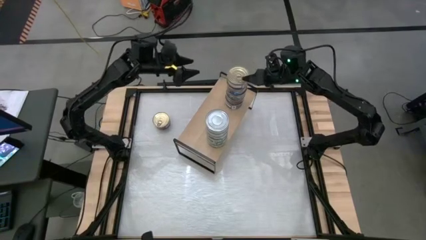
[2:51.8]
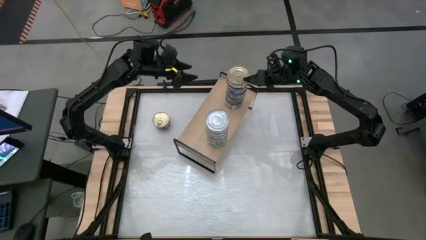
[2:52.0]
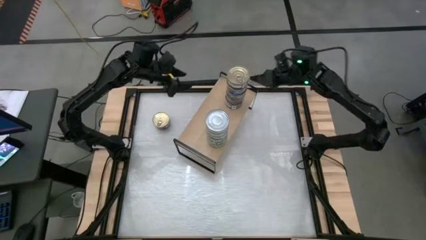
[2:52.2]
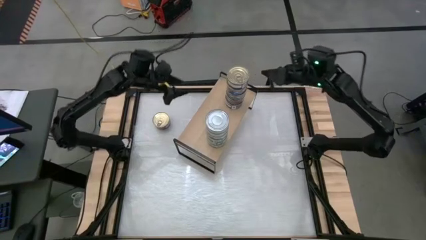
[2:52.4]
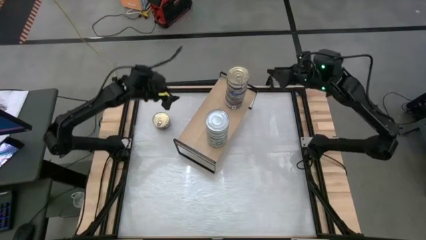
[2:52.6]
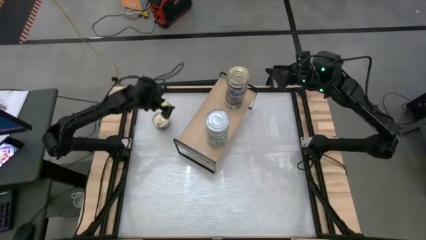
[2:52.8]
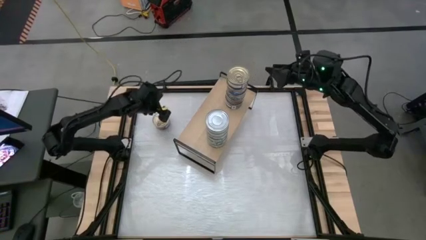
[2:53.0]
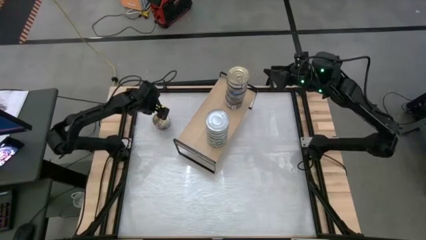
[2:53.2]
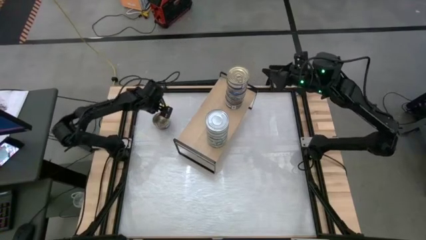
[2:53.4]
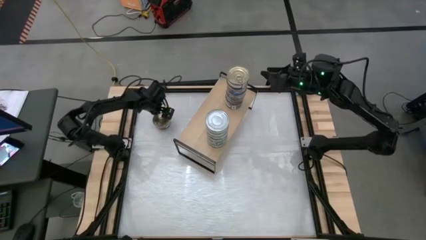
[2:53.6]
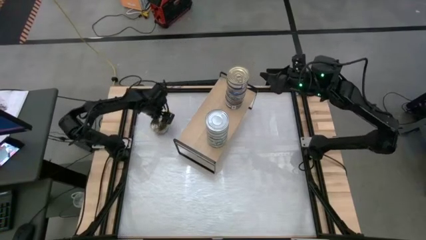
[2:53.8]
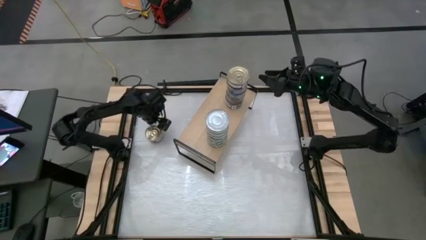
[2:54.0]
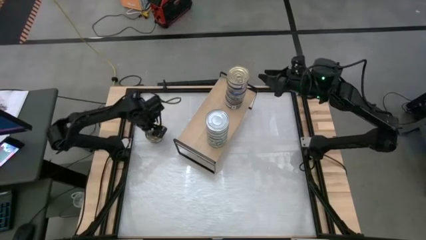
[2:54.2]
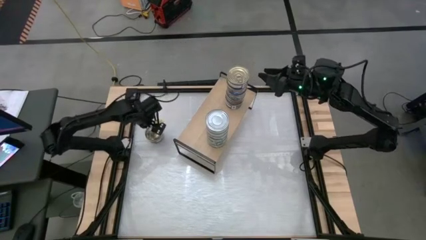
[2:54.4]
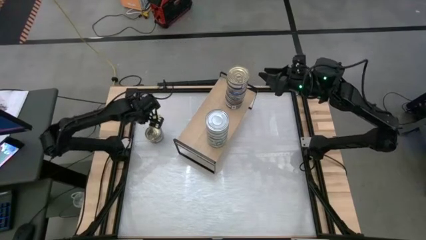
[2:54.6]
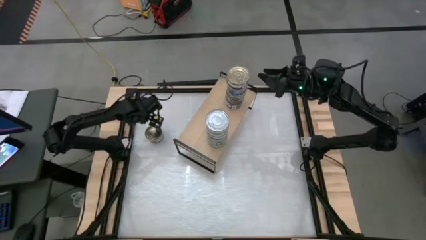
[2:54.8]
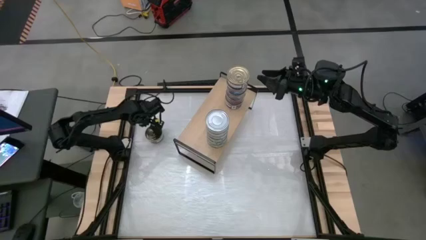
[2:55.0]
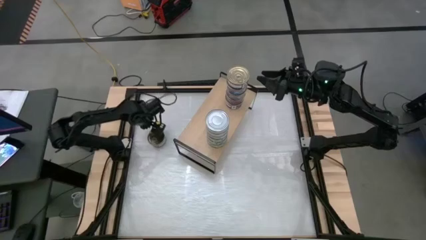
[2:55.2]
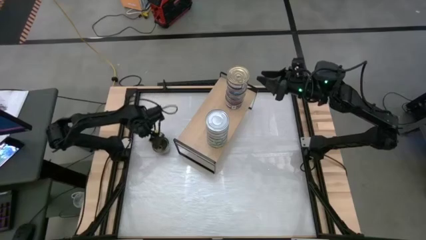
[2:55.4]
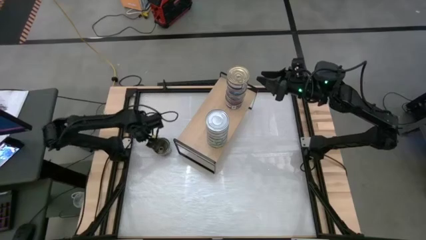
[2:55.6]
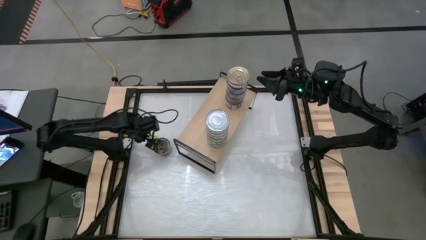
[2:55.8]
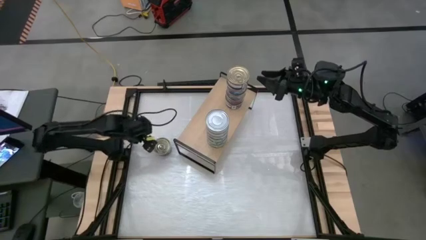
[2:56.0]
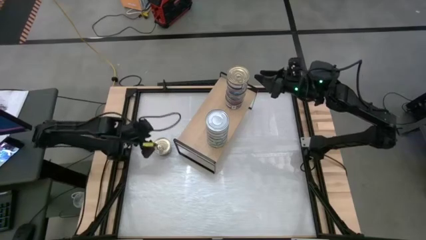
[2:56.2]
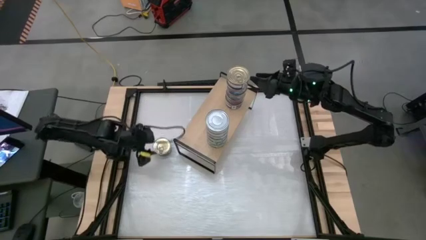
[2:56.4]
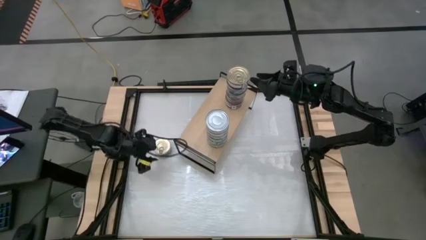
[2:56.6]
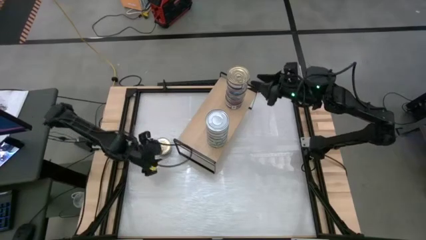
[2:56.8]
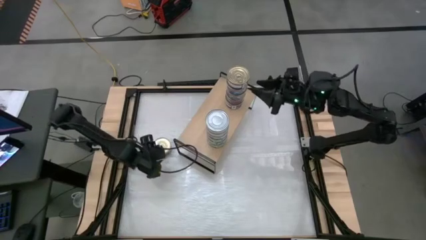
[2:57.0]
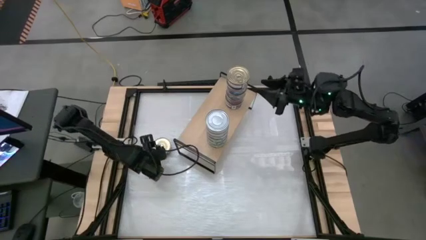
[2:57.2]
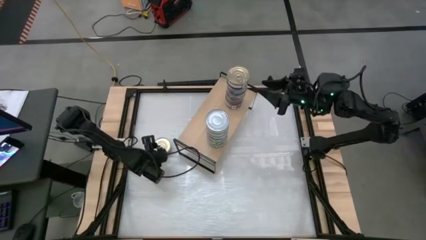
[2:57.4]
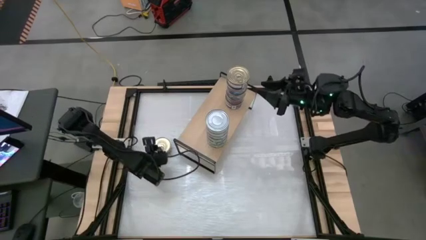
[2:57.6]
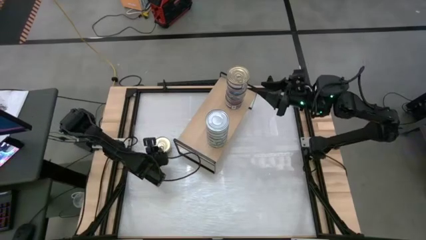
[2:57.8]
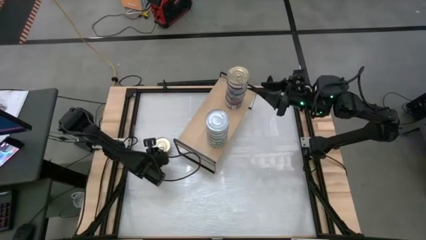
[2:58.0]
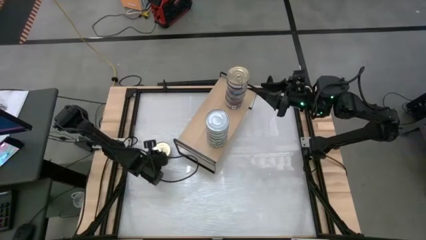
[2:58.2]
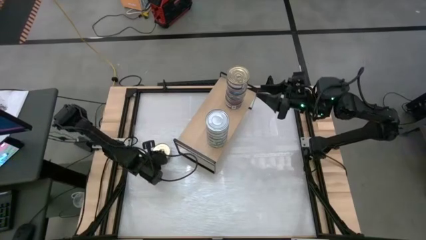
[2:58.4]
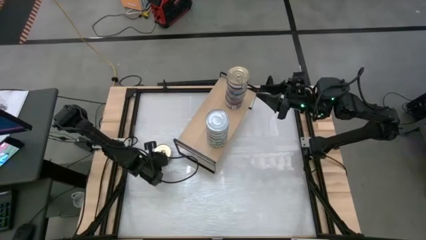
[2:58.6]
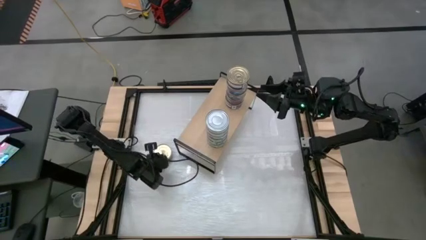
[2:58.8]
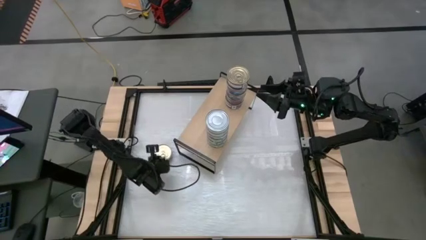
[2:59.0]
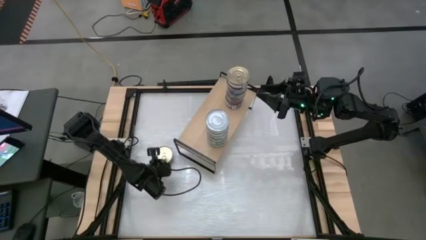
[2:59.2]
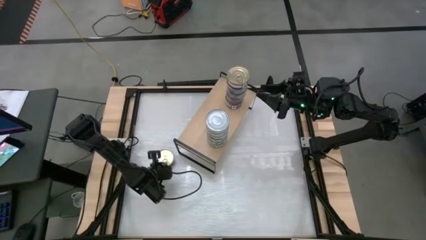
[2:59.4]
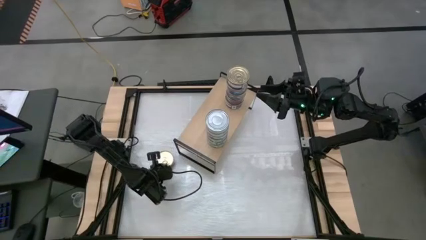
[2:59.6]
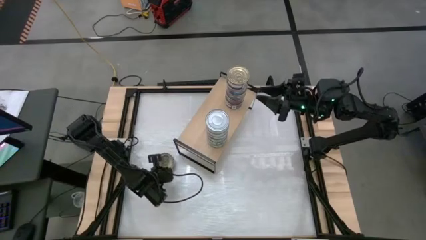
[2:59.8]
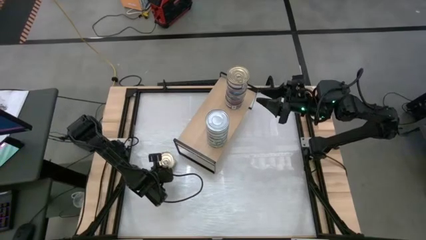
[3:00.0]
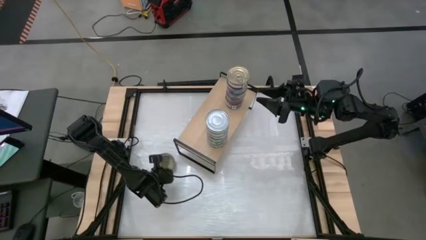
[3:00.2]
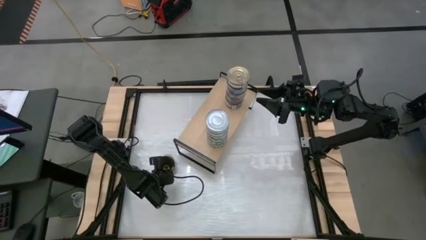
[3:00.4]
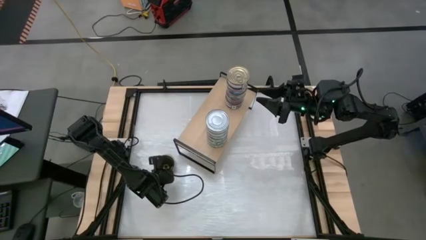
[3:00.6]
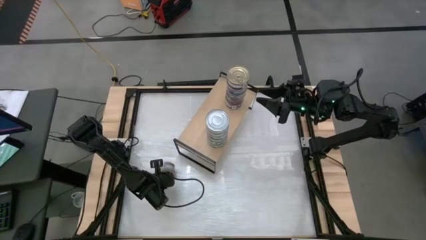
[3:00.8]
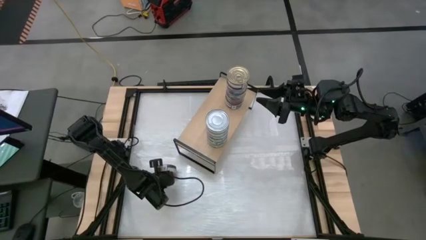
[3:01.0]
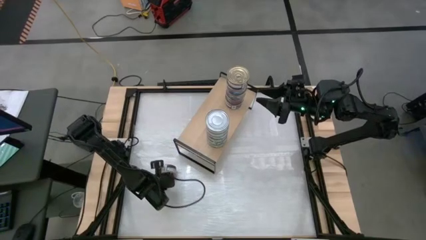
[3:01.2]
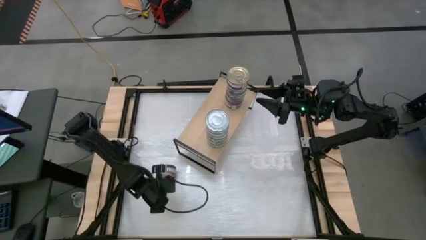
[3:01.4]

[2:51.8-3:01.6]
Task: Stack canned seafood by type on shelf
Stack the blue tuna can on top of the other blue tuna can

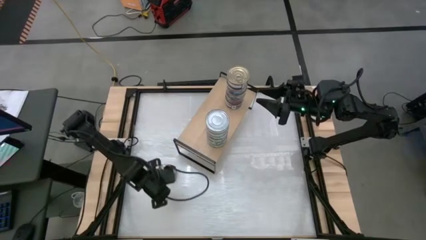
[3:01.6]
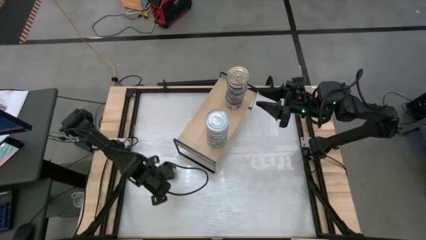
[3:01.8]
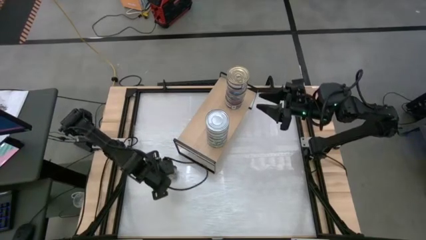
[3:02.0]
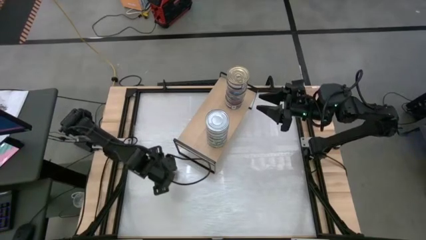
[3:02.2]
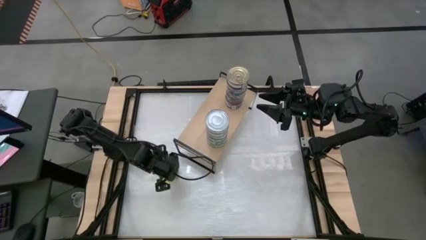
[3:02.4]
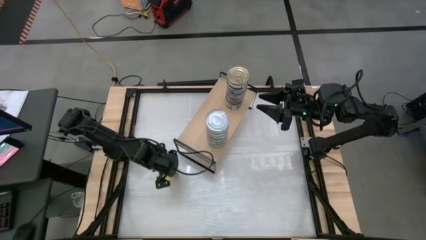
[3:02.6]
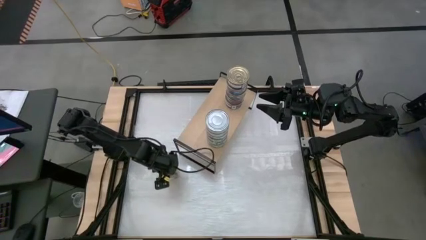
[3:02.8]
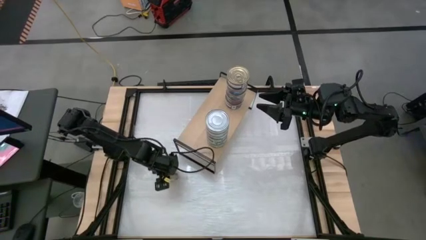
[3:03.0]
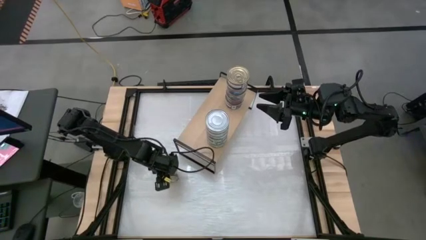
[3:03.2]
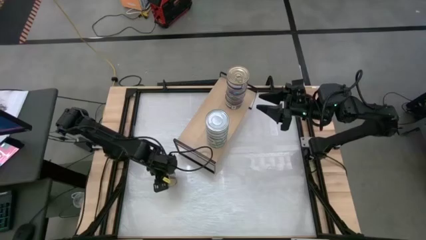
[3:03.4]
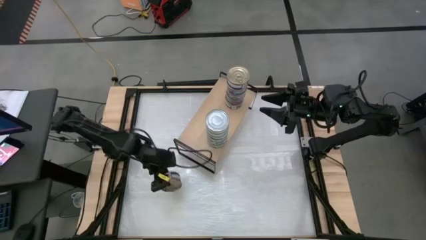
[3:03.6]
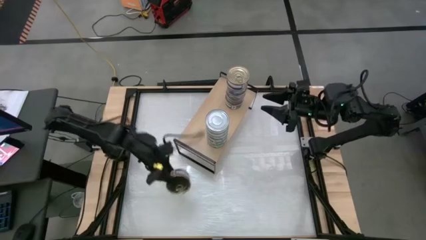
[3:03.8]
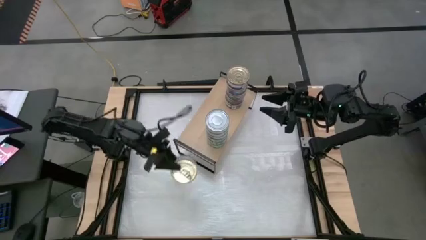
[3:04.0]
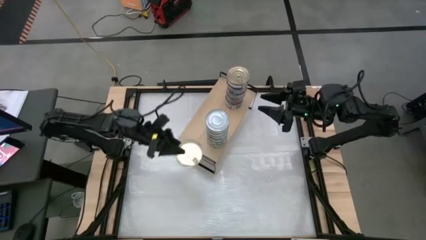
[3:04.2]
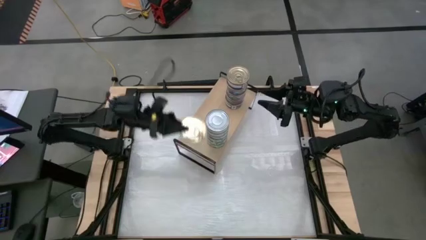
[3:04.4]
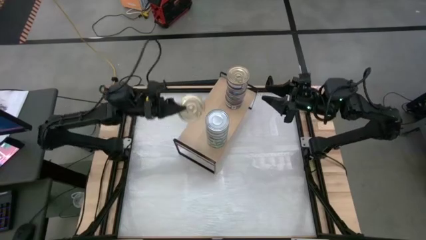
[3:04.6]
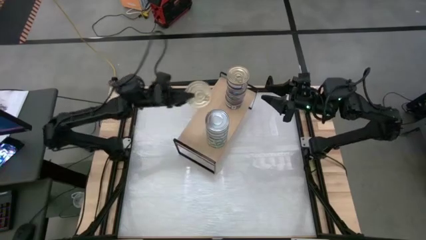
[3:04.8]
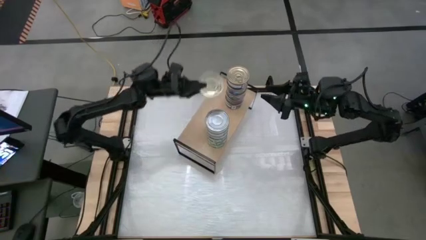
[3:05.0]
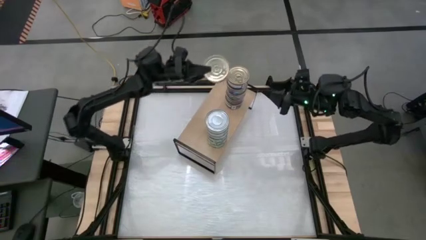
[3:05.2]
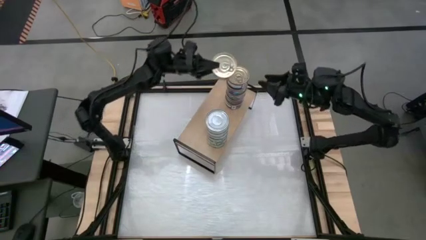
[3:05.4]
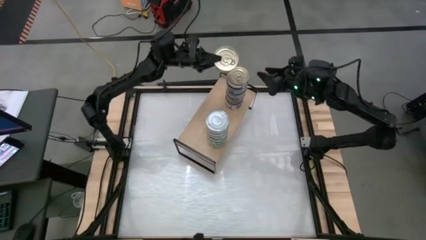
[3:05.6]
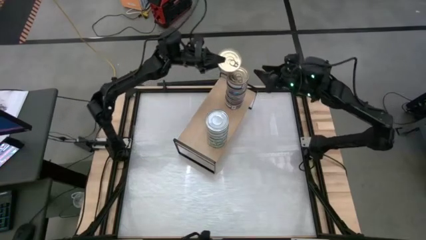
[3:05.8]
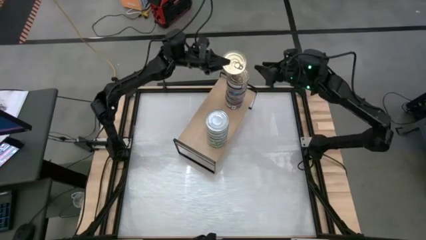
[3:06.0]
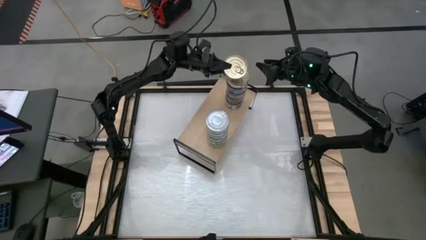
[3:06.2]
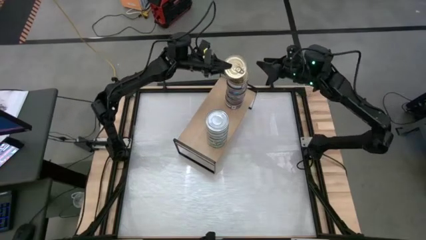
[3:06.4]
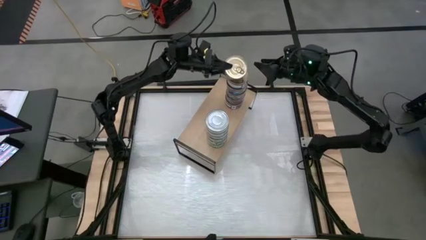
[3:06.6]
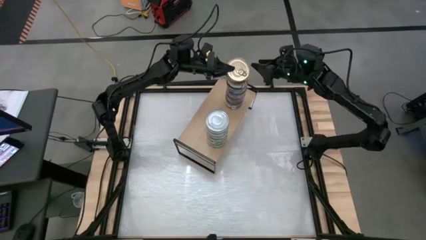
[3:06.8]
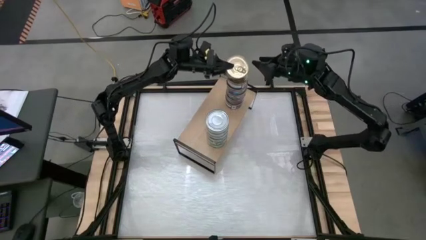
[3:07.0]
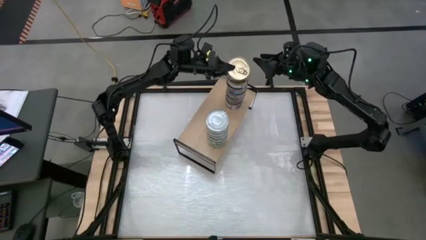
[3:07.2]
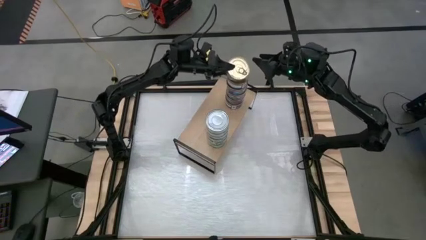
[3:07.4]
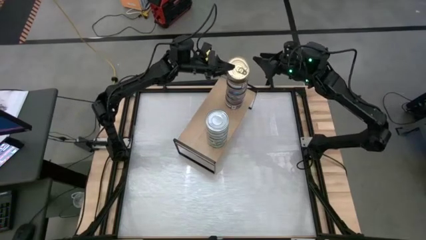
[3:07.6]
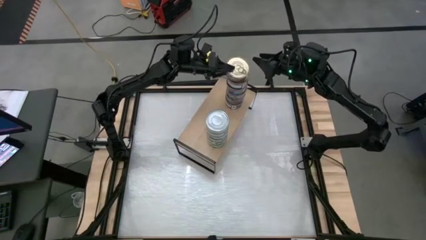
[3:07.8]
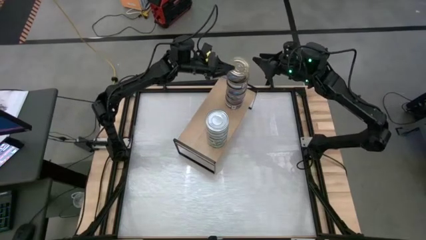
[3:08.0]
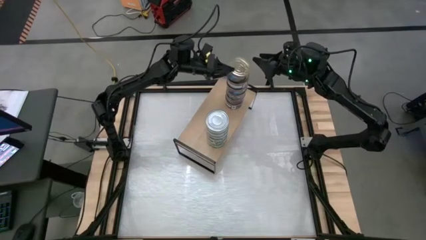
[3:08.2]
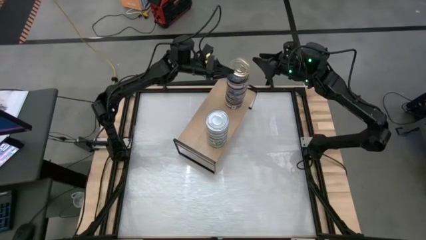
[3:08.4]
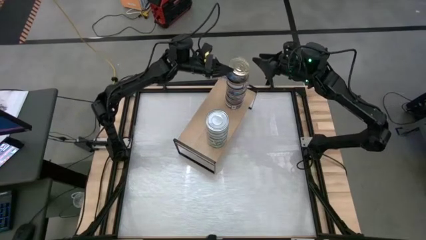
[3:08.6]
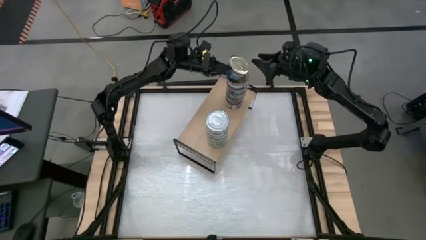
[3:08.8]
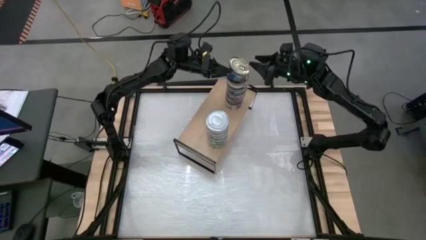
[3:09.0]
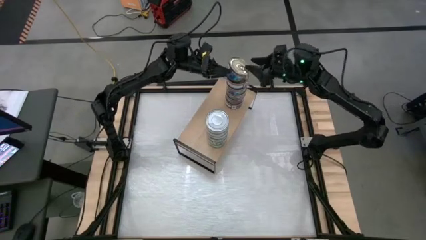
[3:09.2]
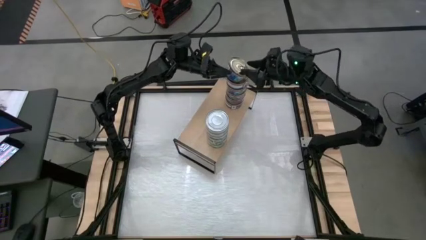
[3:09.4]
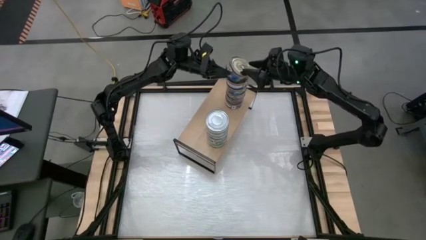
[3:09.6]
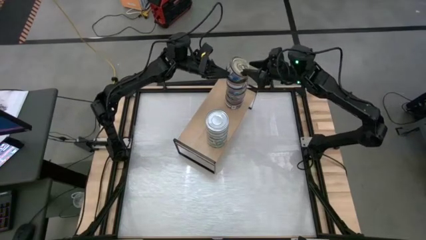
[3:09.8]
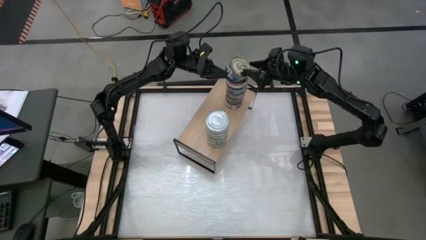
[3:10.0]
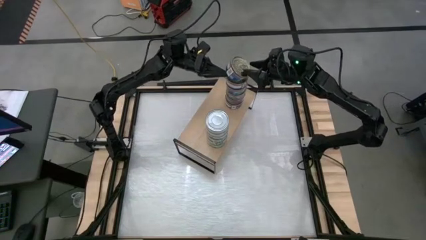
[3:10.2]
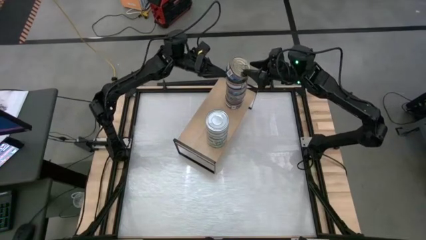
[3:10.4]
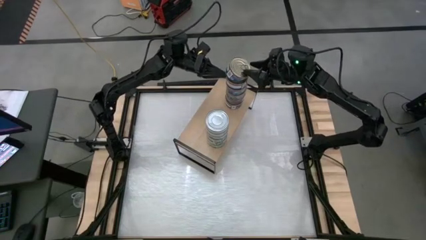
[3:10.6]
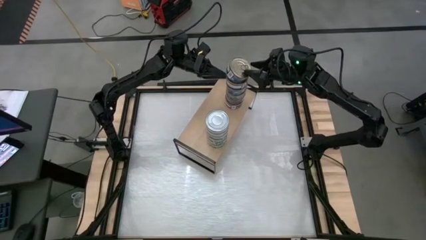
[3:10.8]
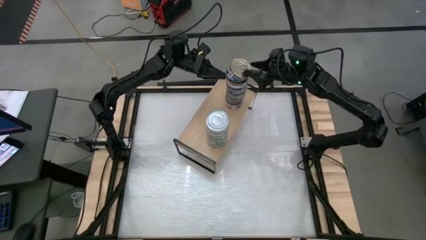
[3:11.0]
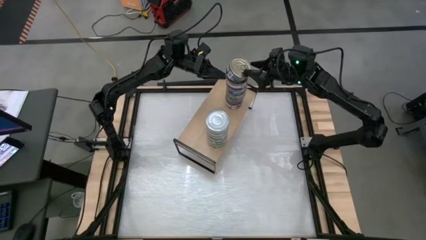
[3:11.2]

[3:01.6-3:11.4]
Stack the blue tuna can on top of the other blue tuna can
